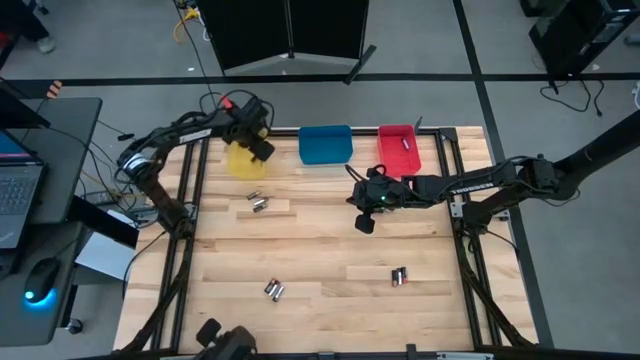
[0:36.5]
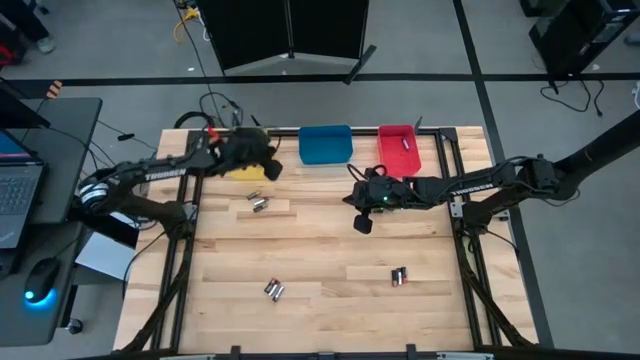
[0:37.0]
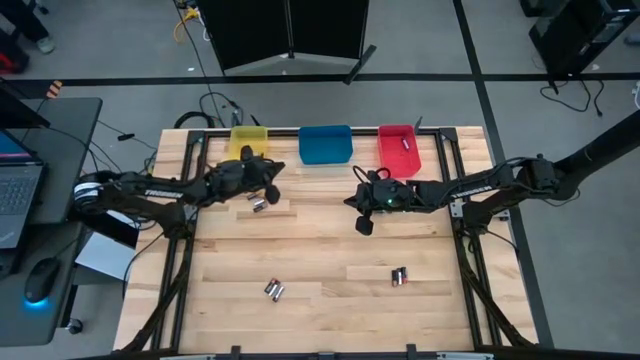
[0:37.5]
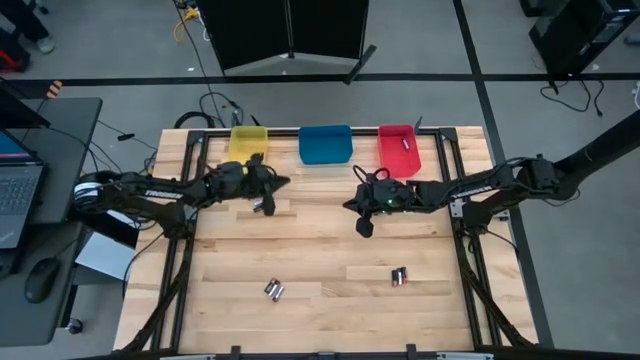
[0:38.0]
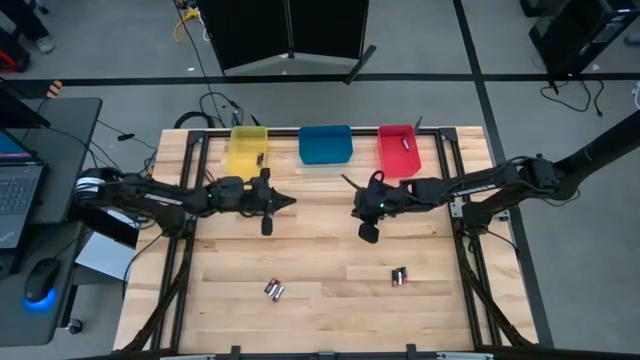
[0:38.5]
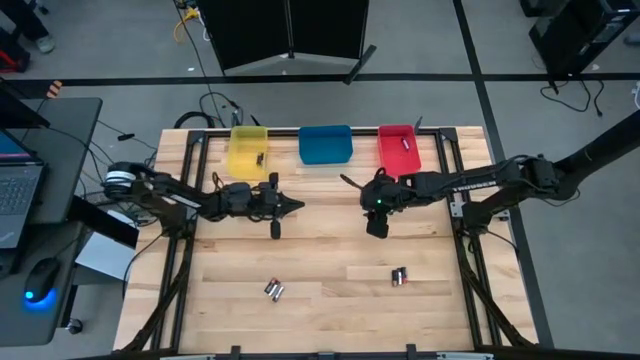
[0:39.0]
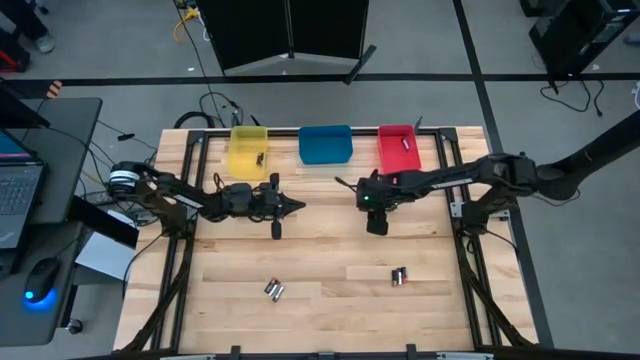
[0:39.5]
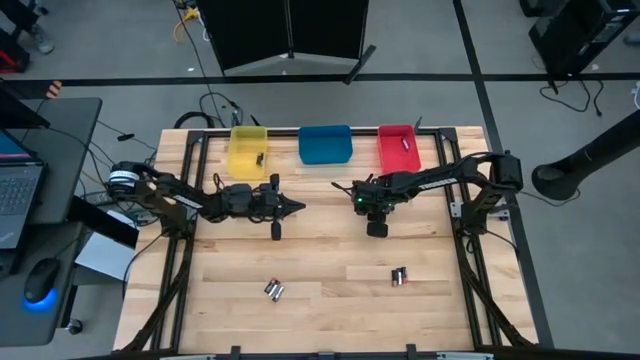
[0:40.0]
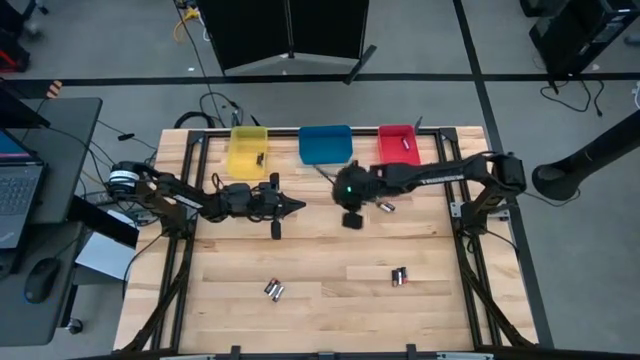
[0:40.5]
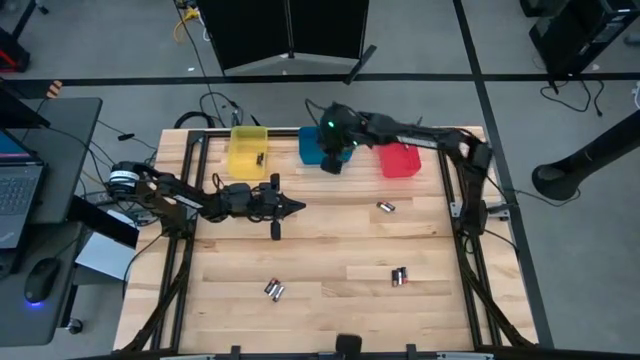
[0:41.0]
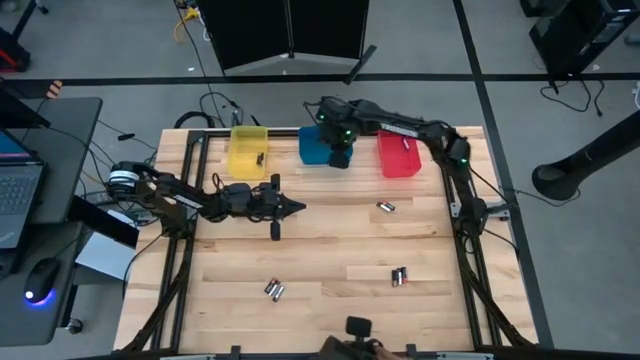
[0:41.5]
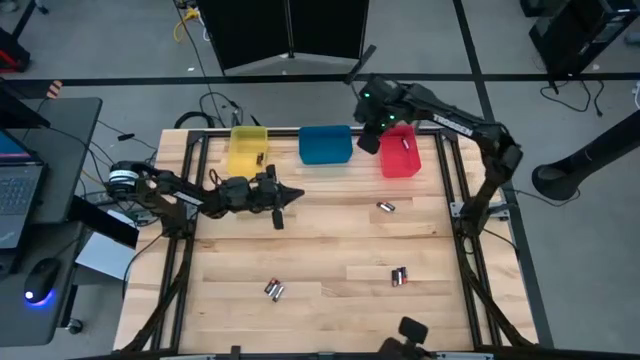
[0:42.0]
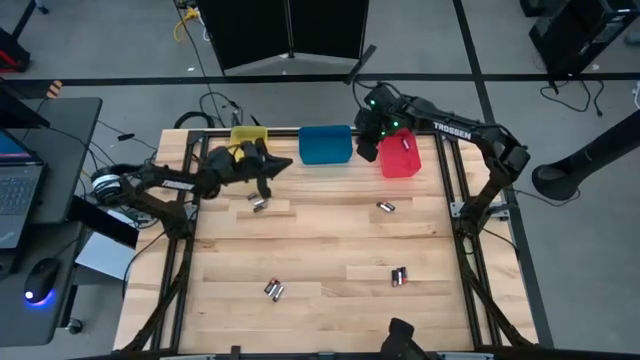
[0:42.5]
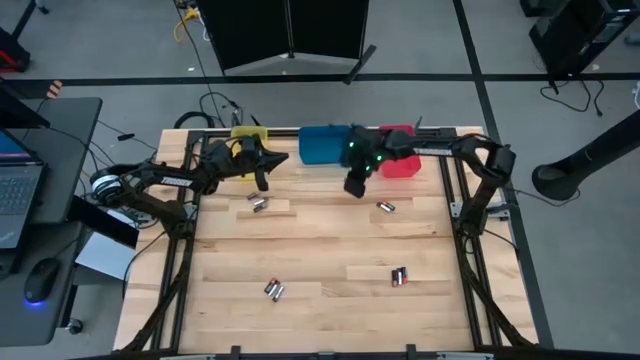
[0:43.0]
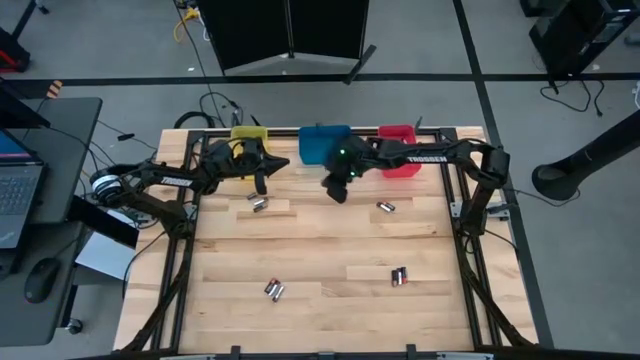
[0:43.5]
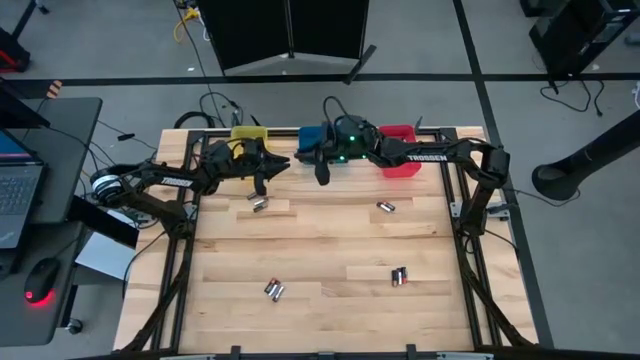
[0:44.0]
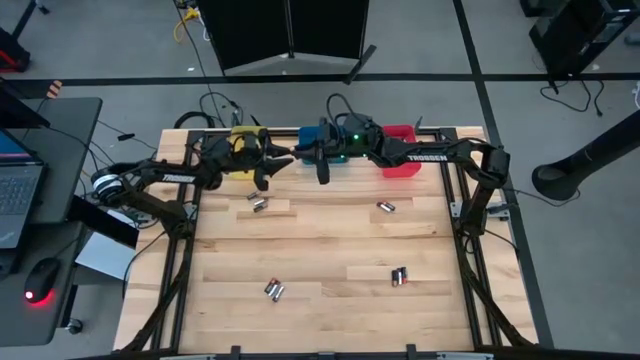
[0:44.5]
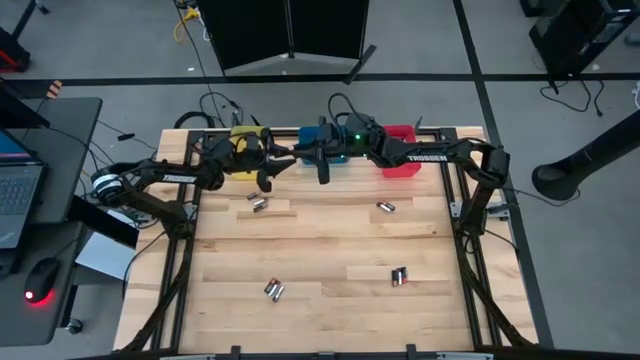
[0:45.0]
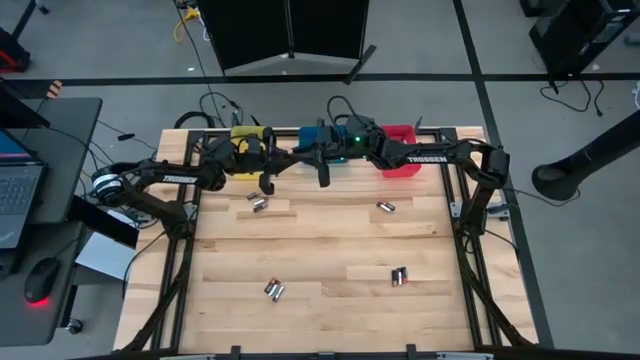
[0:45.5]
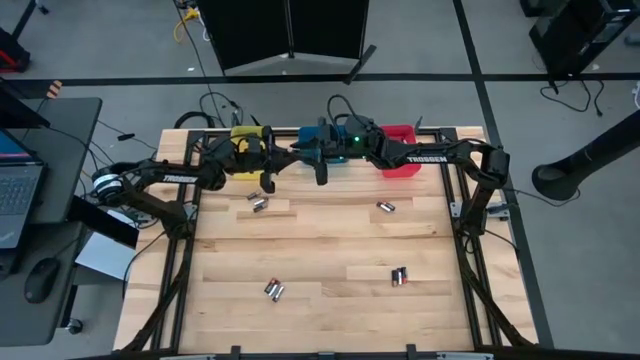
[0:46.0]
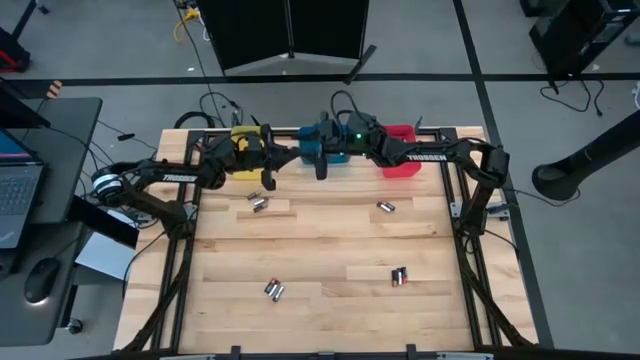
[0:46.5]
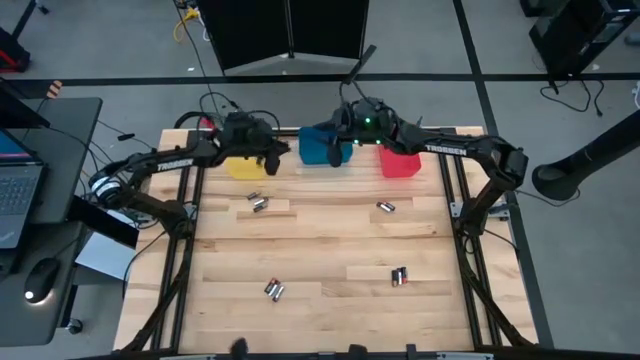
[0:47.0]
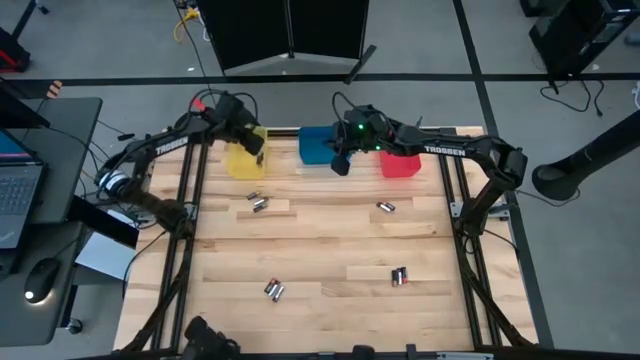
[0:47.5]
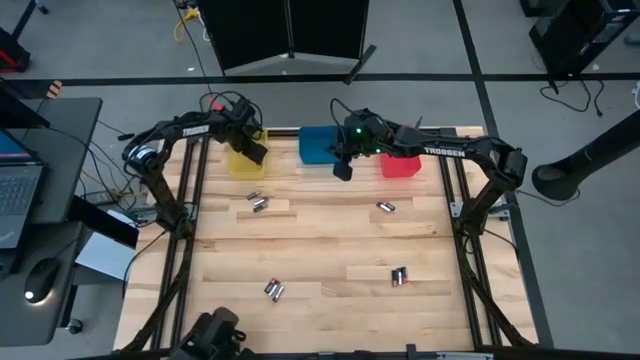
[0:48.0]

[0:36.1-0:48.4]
Task: Sort batteries
Put the black battery into the yellow bin

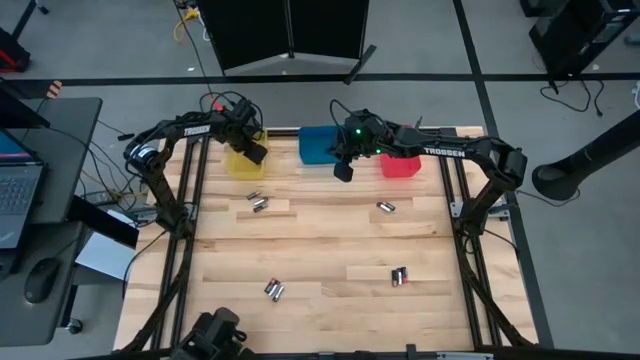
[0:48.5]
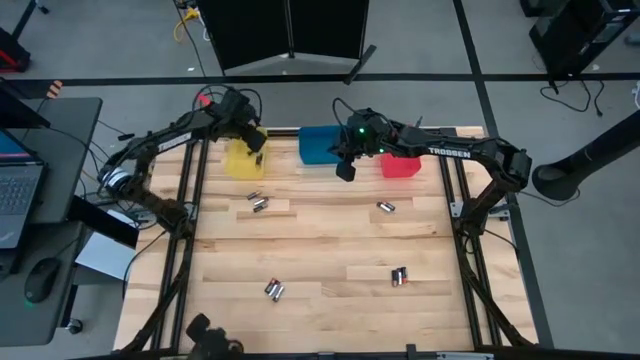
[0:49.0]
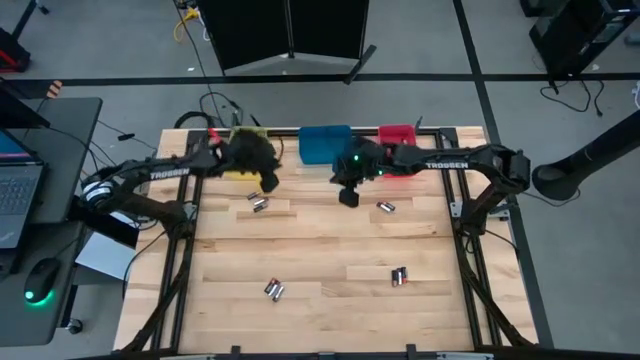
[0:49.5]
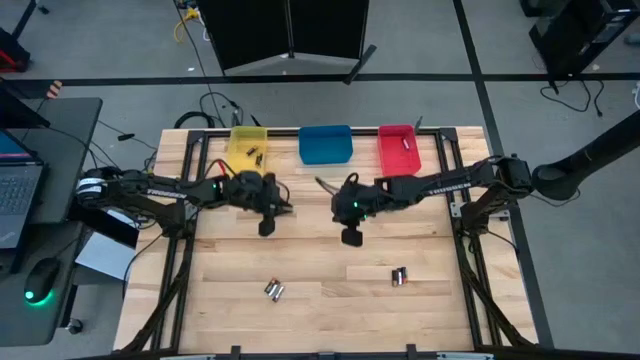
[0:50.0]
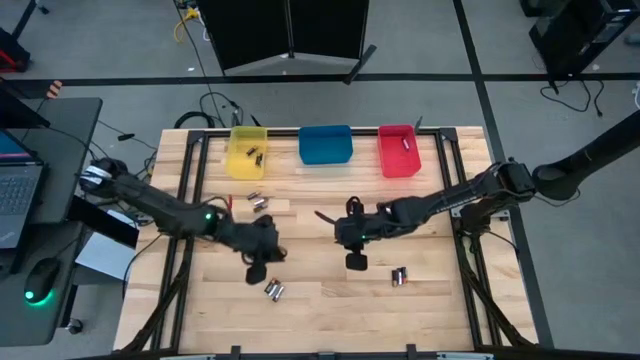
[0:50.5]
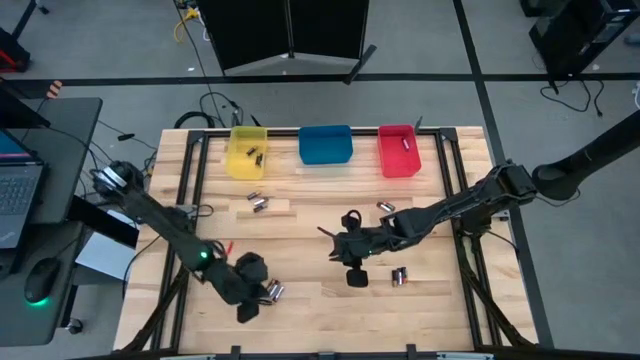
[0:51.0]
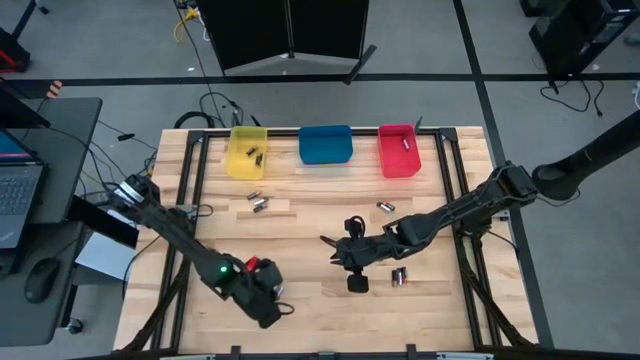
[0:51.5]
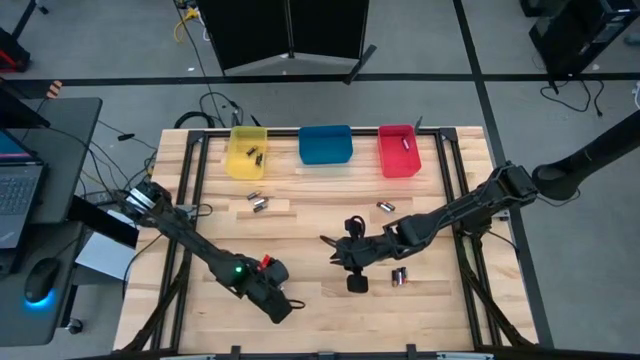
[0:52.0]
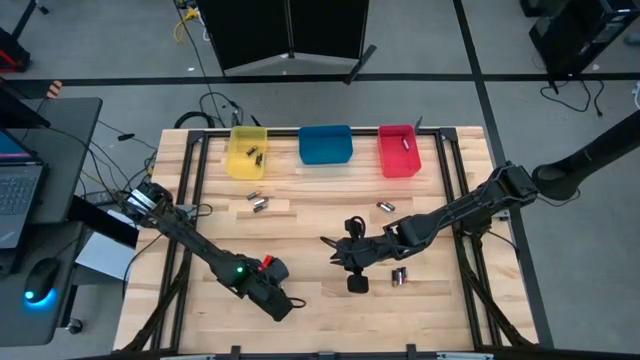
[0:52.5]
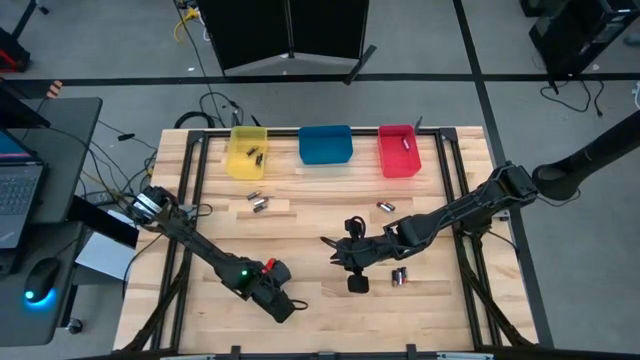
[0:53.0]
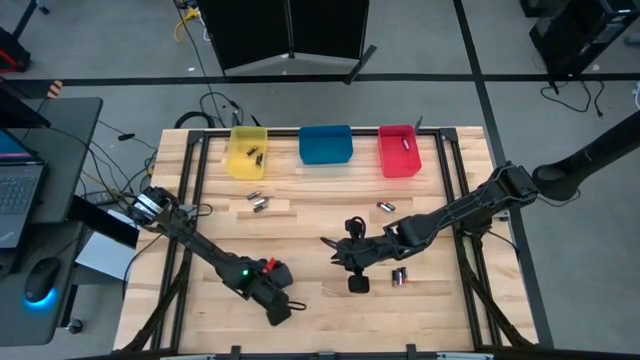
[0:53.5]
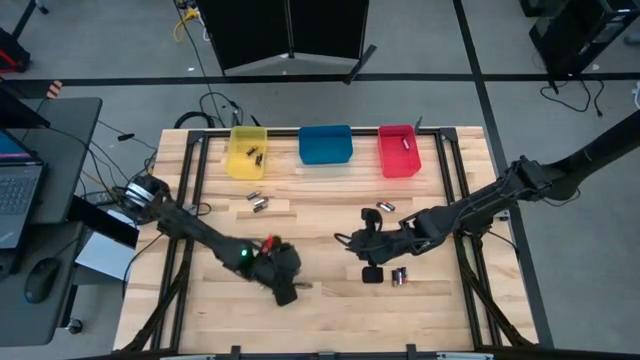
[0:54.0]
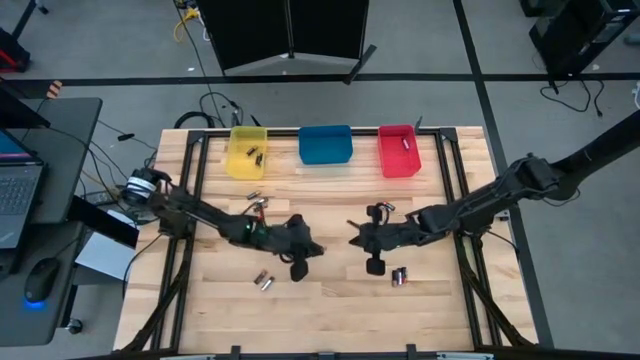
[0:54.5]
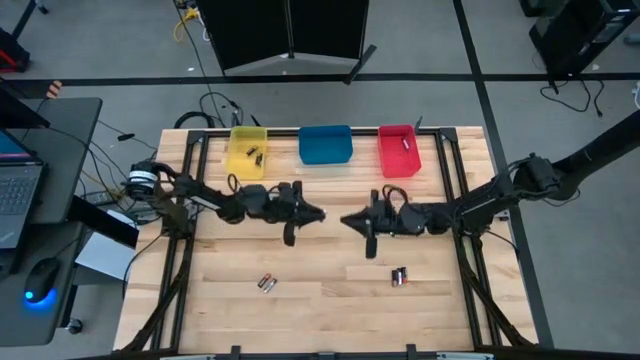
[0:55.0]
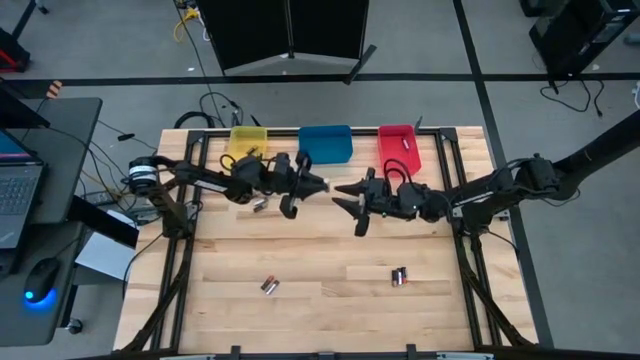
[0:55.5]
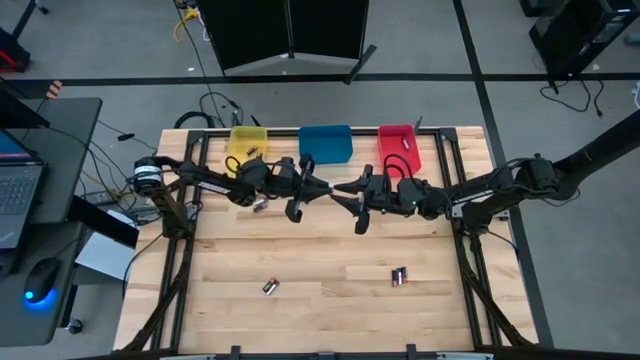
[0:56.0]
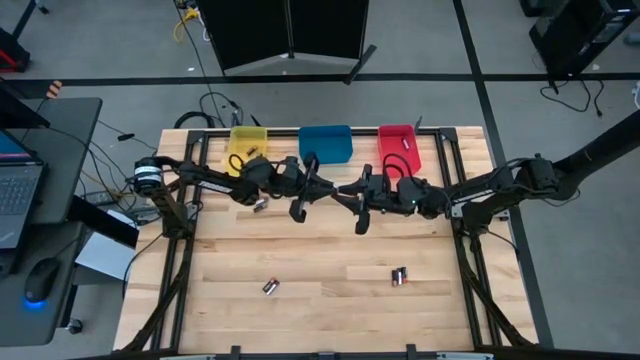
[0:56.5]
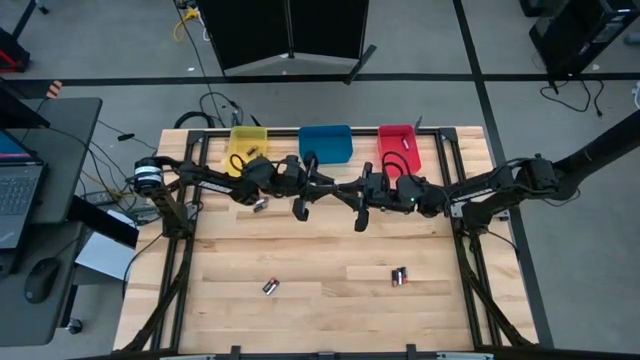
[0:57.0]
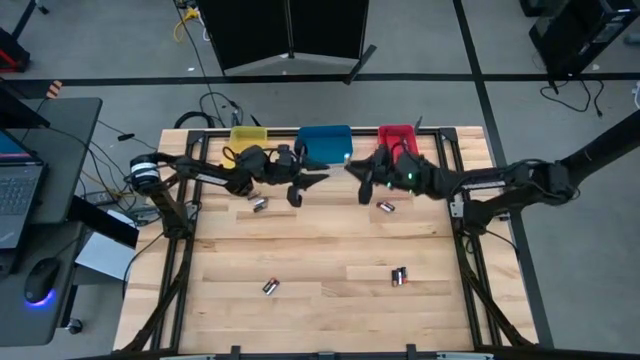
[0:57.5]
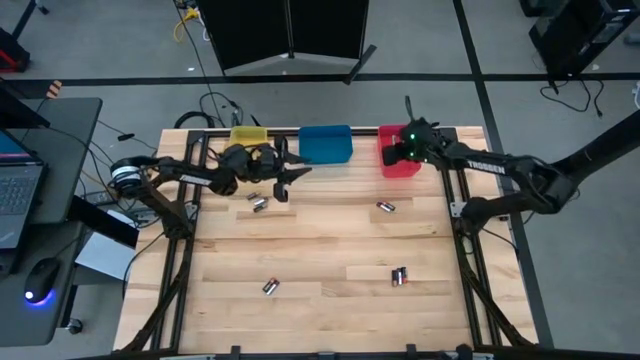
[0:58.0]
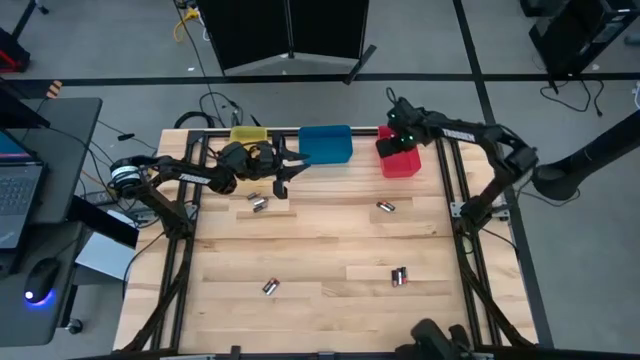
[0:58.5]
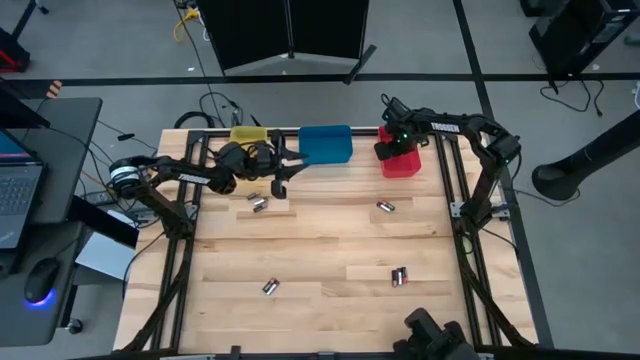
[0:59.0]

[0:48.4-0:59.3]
Put the silver battery into the pink bin
